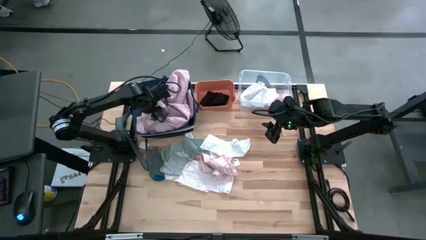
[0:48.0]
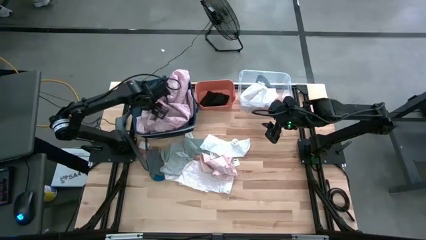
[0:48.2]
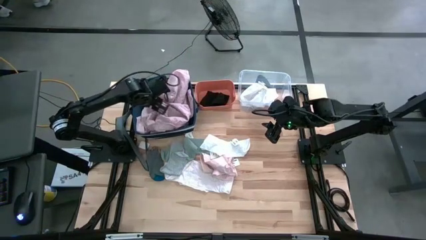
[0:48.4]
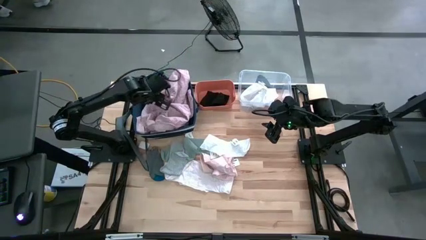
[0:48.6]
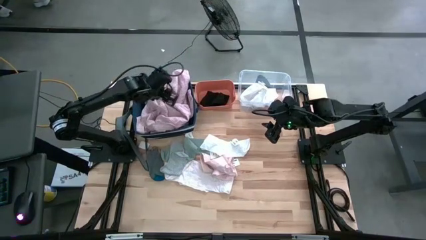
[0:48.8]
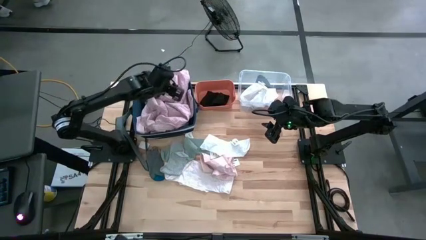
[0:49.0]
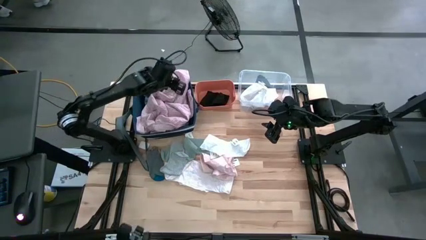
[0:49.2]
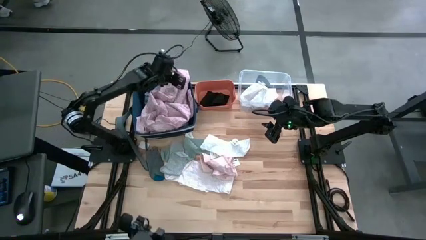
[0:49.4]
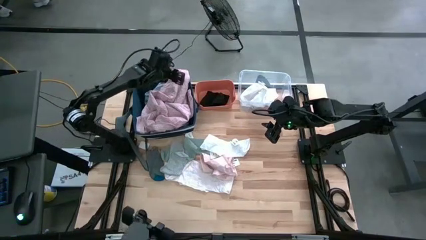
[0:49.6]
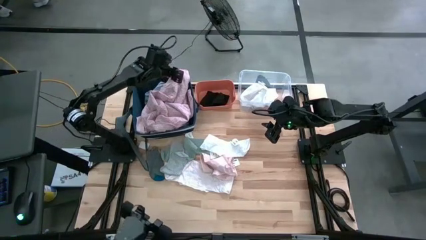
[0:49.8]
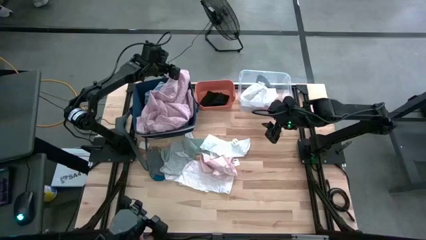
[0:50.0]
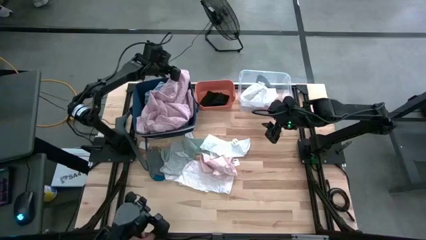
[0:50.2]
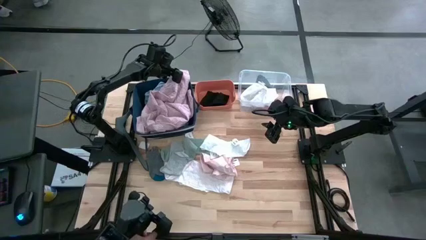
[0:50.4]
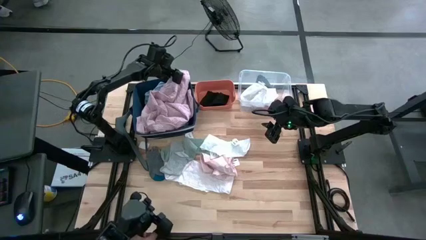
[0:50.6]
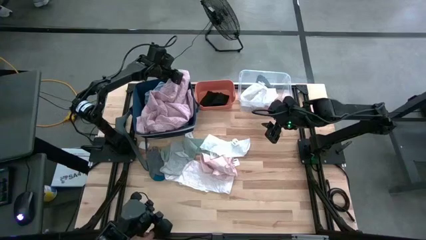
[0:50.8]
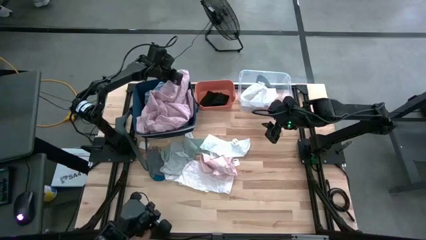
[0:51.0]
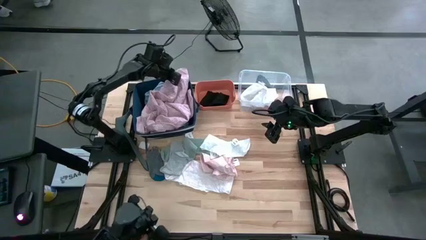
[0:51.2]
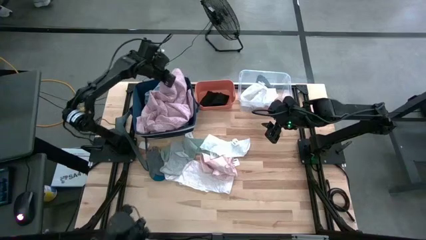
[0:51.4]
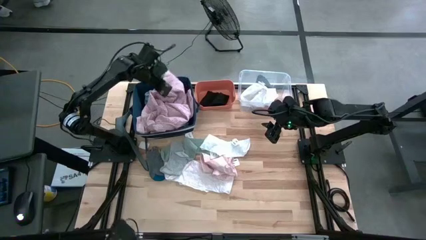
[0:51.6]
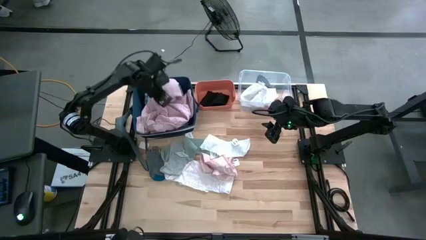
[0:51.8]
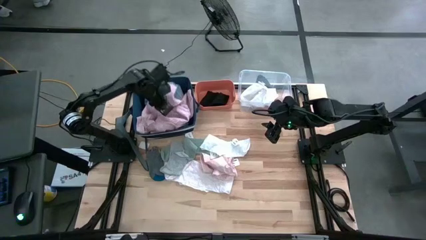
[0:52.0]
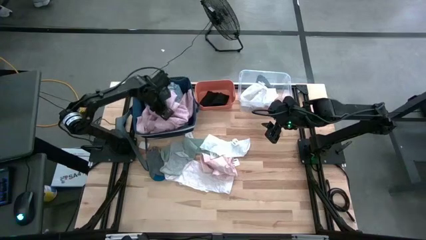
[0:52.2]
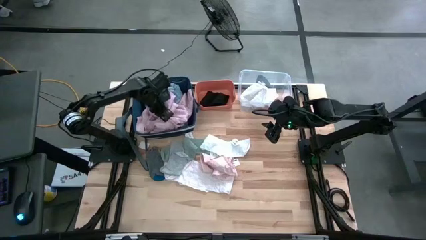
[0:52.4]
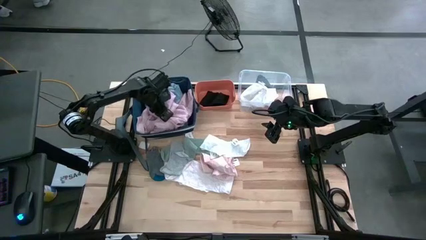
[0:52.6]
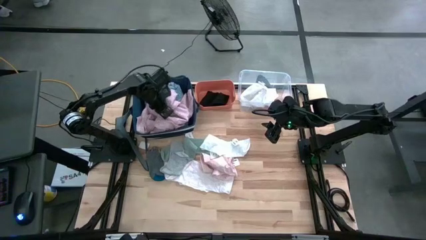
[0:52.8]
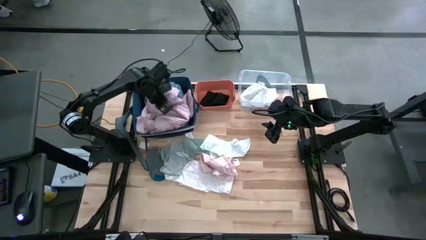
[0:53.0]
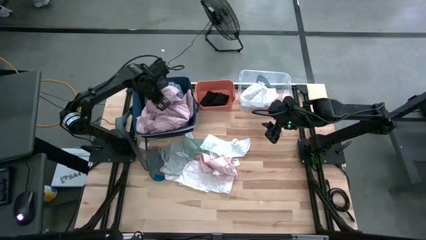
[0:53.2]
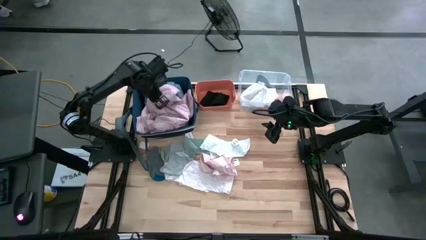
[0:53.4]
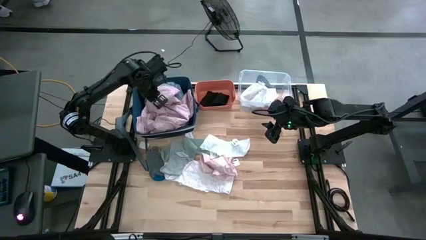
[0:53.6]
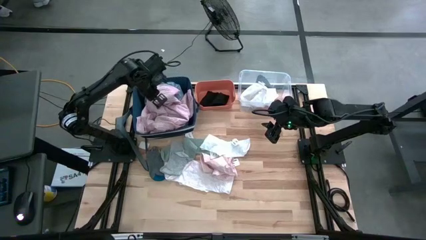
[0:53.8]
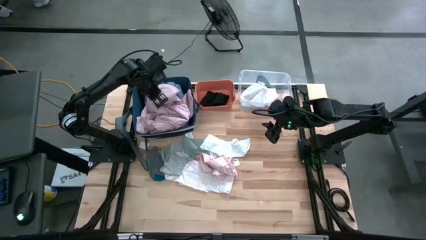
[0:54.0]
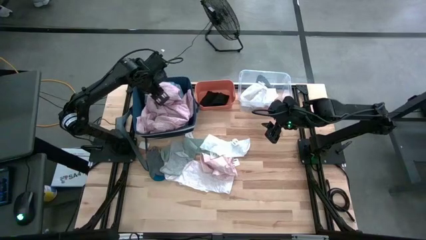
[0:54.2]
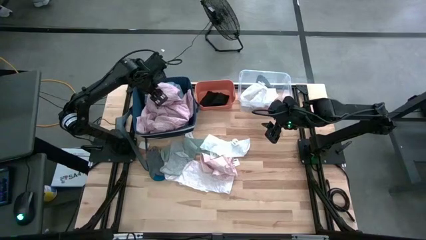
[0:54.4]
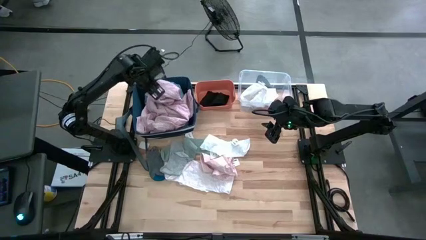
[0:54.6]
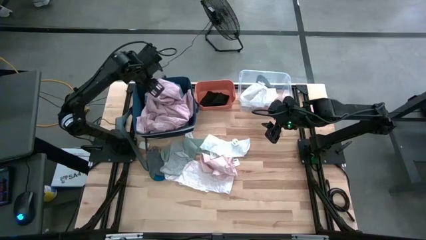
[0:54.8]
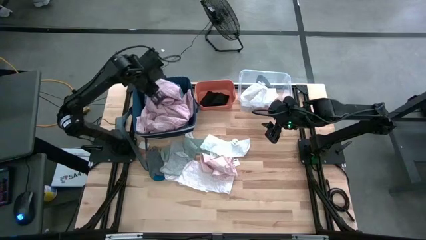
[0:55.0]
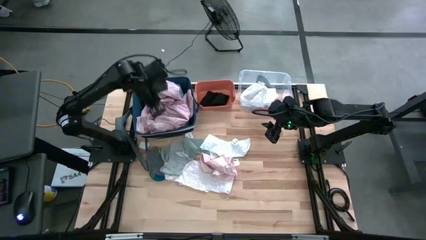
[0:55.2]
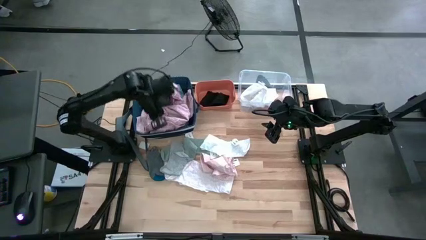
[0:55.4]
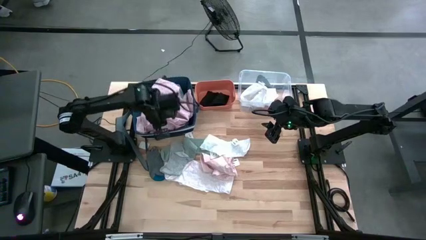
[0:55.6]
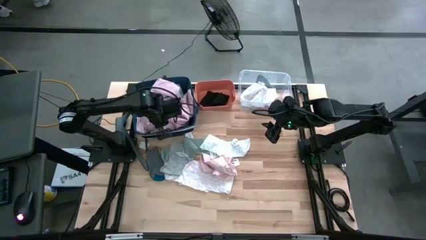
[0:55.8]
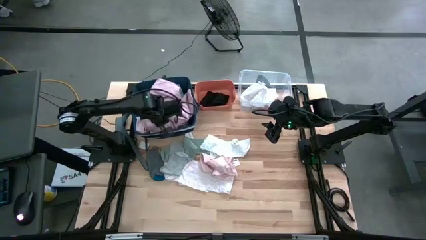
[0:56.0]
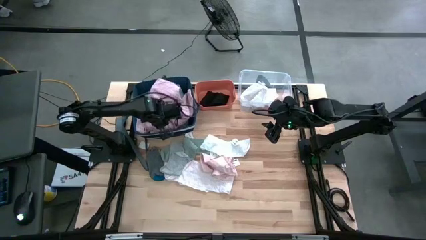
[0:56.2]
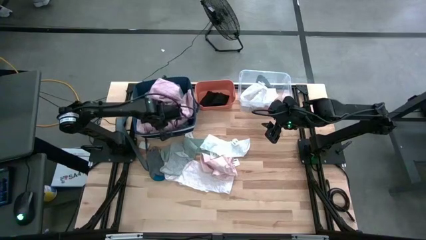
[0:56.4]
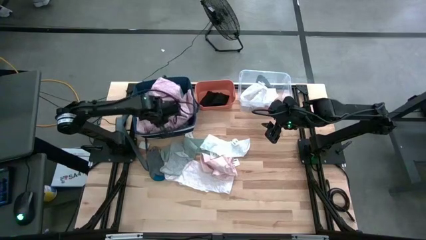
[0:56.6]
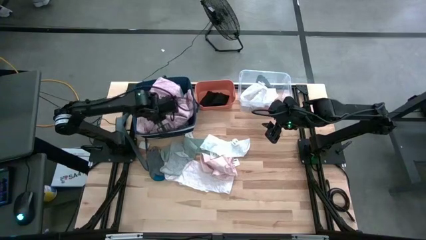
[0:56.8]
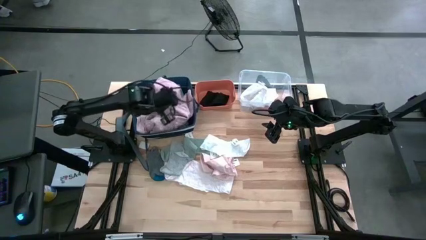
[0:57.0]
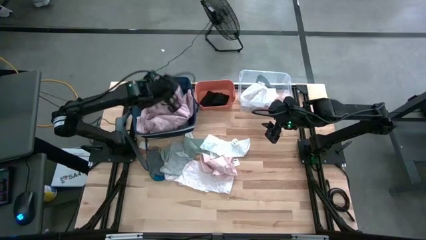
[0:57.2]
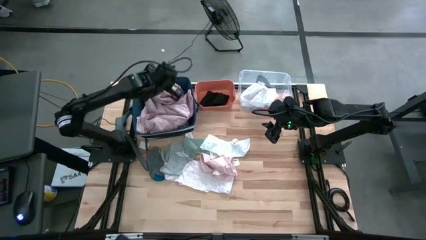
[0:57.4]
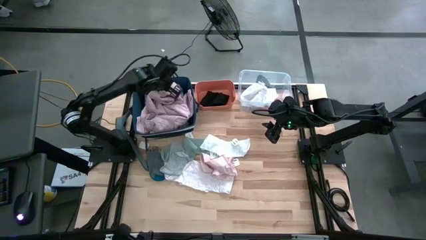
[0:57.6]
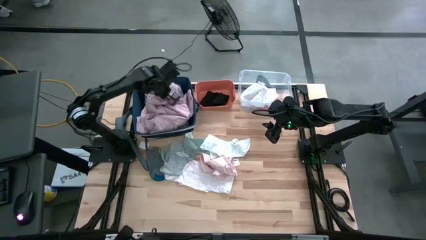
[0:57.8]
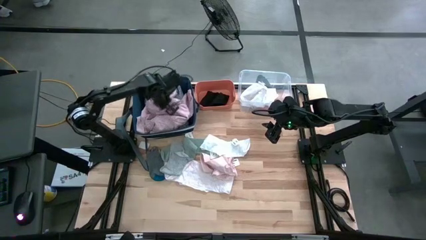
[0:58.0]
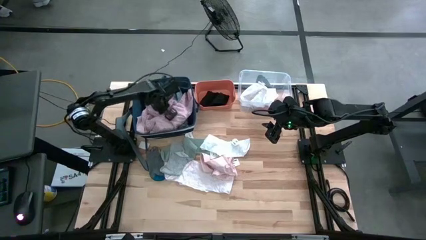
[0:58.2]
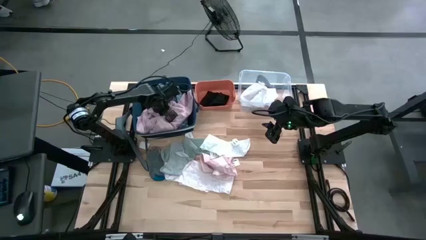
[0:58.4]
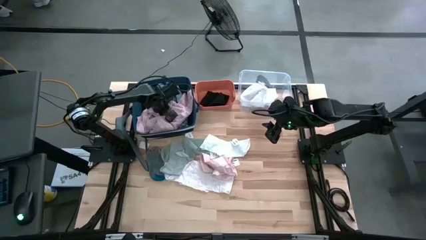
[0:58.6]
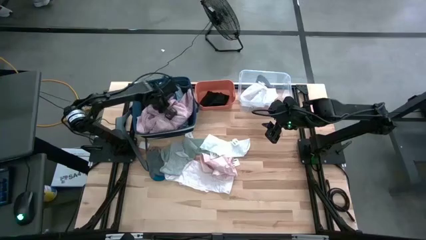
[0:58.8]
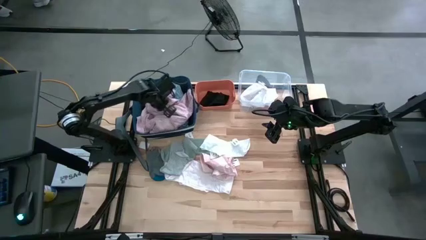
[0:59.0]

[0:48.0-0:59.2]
Task: Pick & Place Cloths
Put the pink blouse into the blue organizer

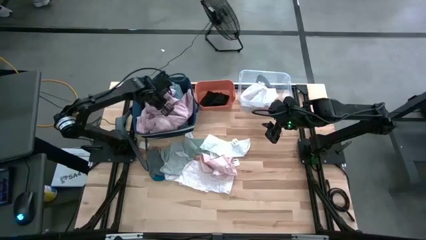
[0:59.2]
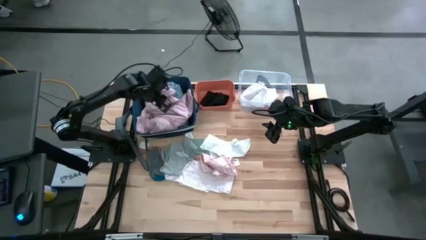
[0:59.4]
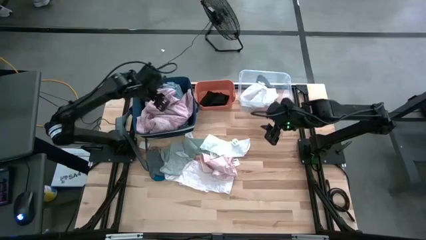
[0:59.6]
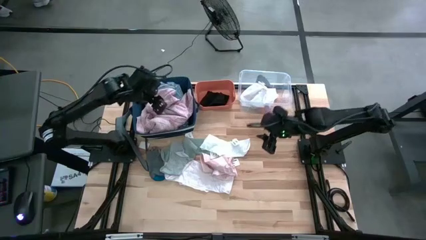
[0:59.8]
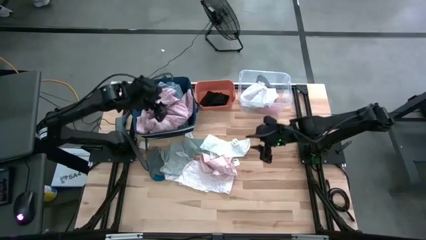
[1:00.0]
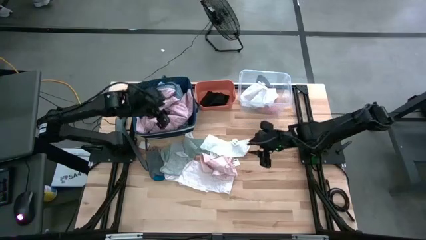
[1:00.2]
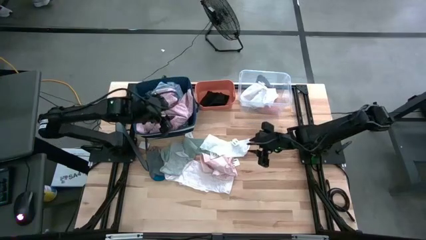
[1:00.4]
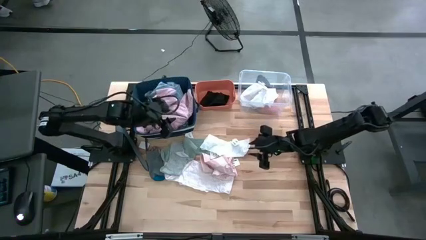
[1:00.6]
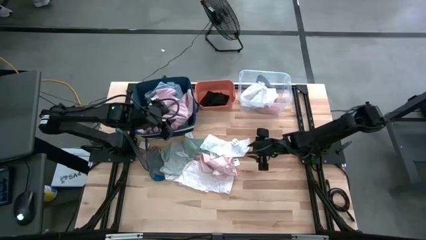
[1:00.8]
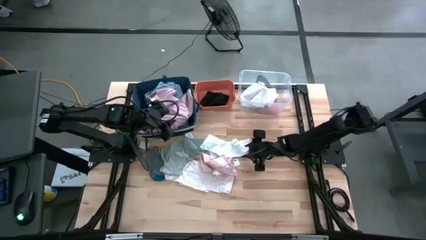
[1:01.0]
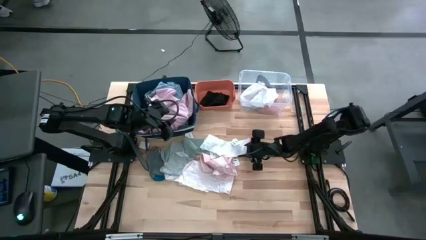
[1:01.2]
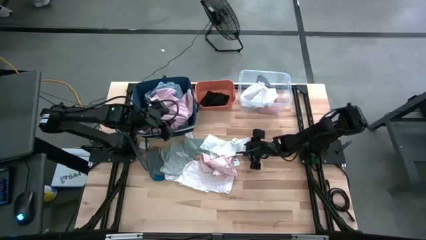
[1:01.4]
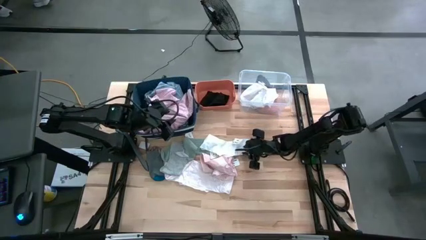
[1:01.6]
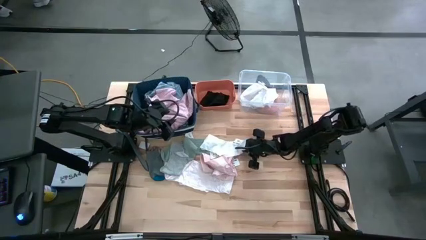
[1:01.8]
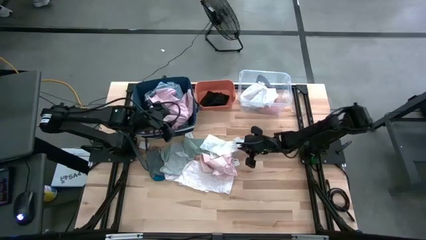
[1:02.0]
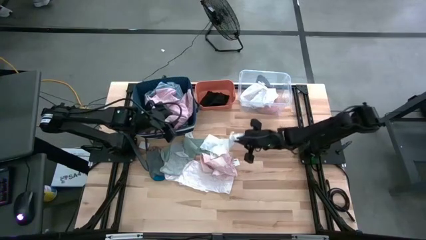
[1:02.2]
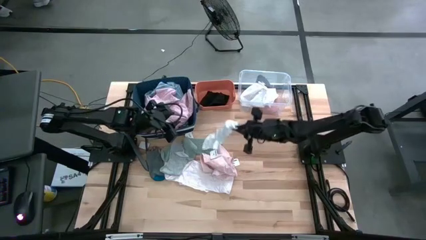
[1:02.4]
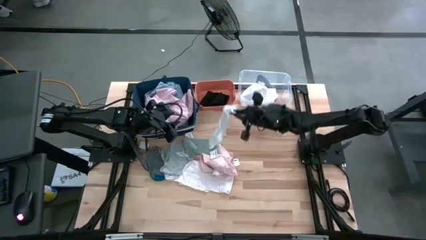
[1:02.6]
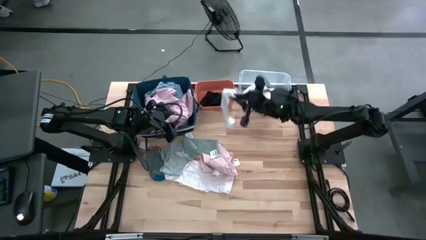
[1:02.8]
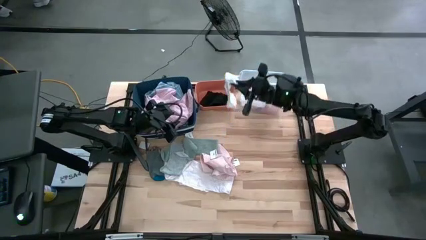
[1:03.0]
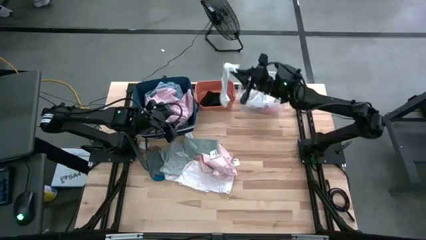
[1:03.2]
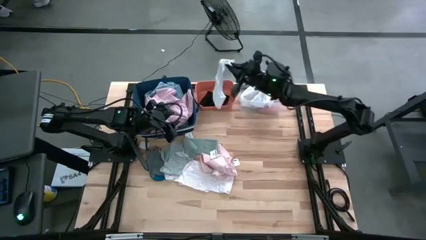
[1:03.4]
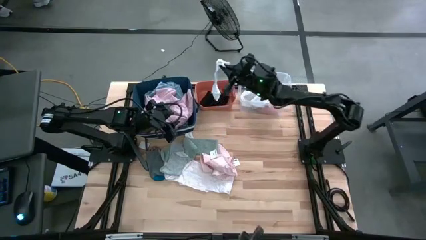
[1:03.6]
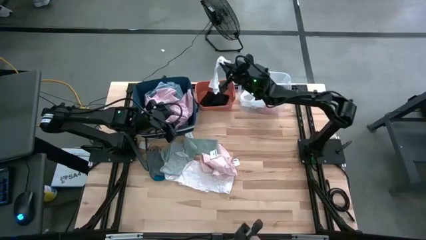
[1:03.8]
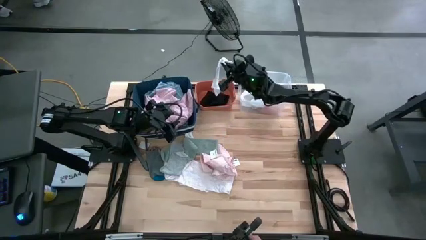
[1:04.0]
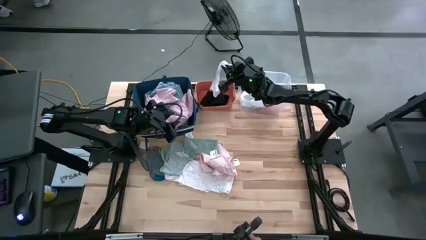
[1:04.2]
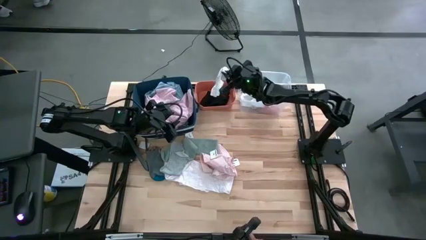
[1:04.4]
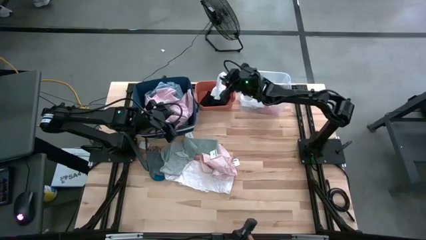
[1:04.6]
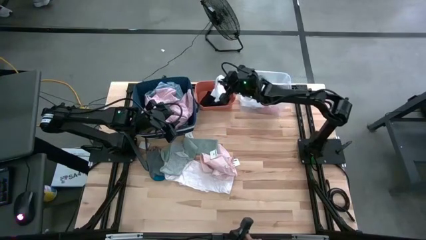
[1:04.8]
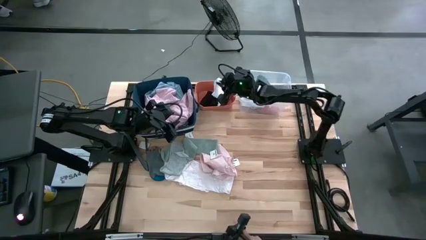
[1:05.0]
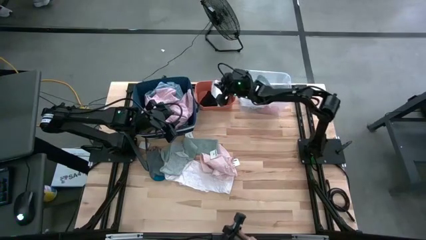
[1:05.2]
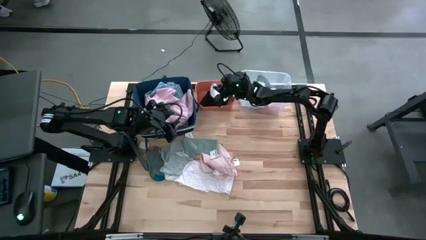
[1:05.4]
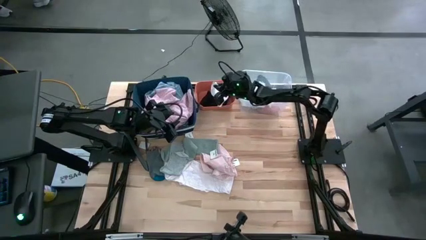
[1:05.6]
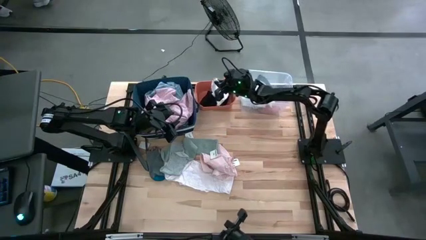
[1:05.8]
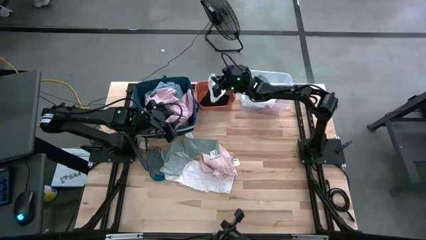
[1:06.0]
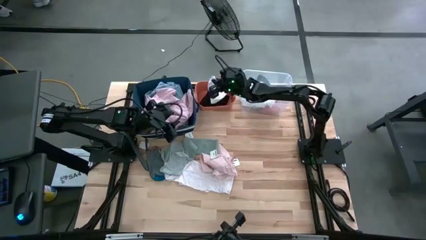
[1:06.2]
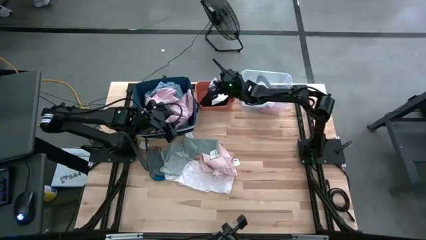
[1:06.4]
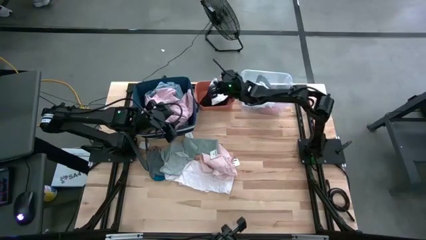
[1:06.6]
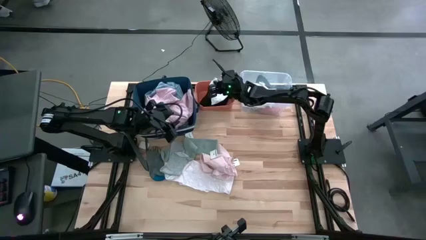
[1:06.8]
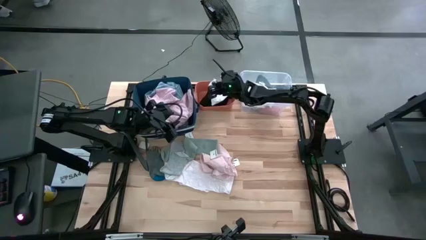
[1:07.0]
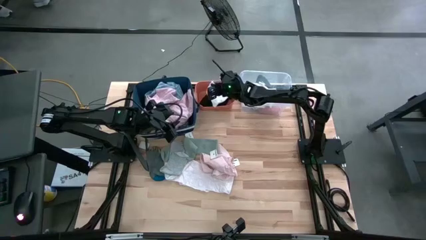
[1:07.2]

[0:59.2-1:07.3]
Put the white sock into the orange bin
